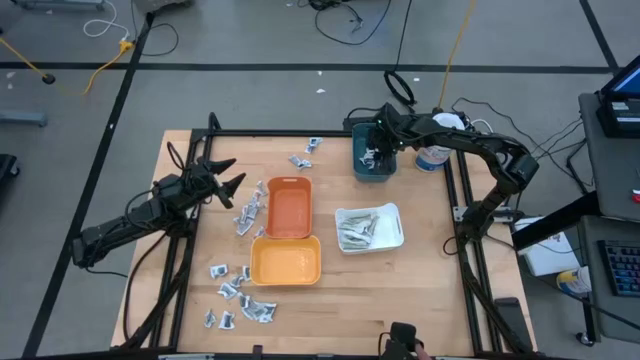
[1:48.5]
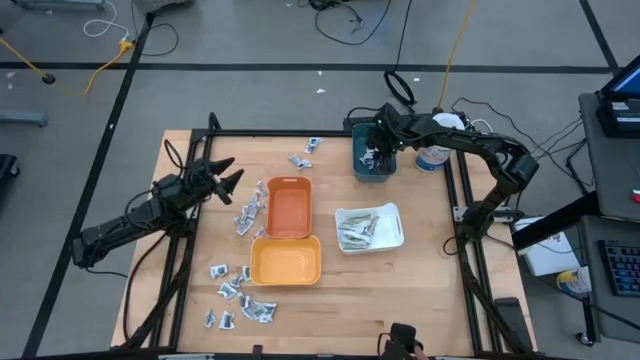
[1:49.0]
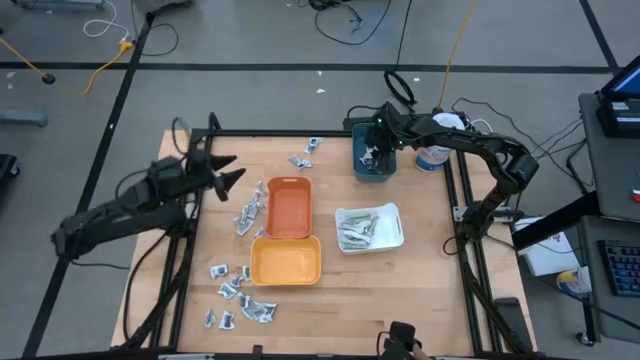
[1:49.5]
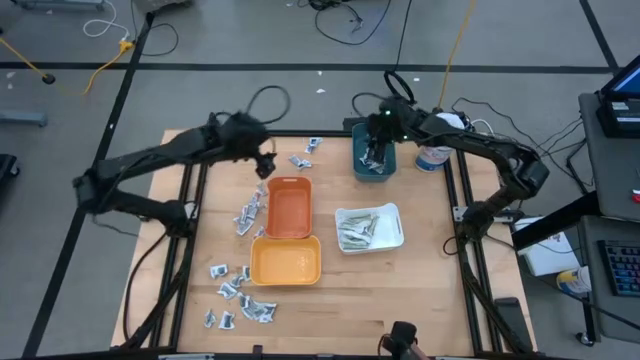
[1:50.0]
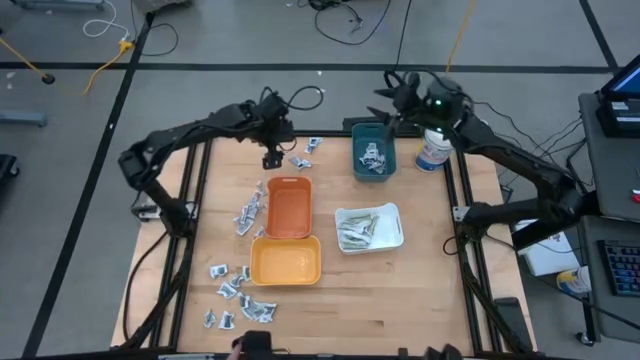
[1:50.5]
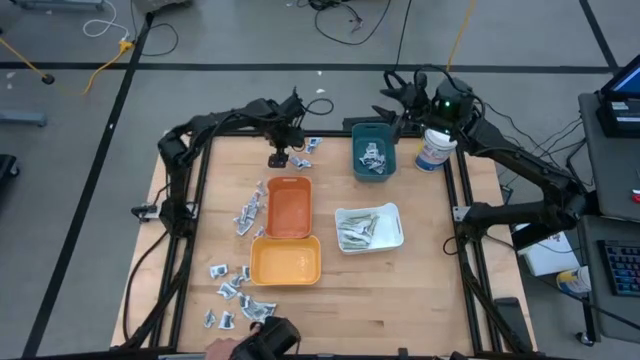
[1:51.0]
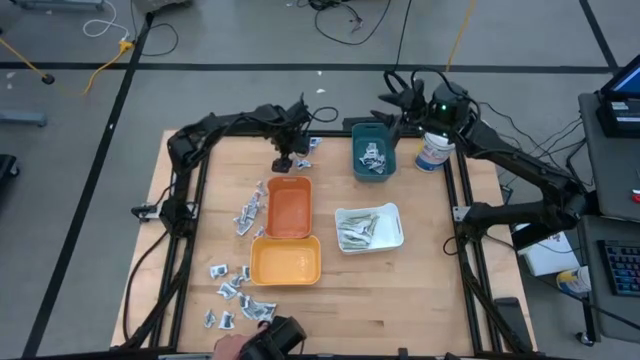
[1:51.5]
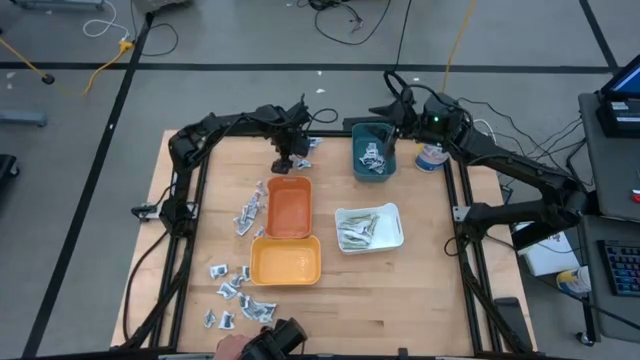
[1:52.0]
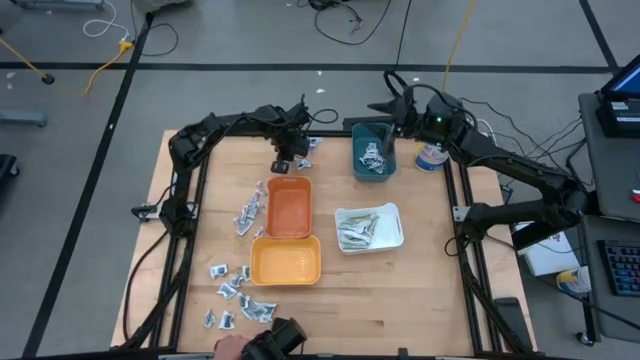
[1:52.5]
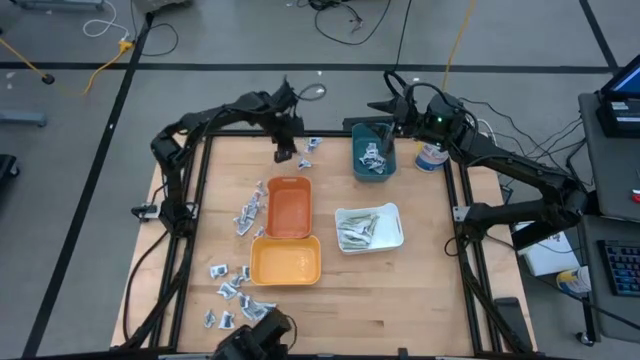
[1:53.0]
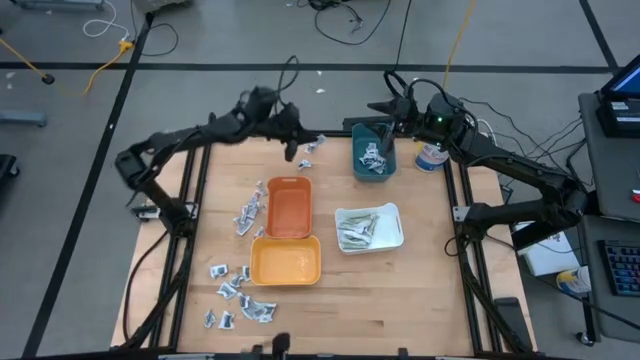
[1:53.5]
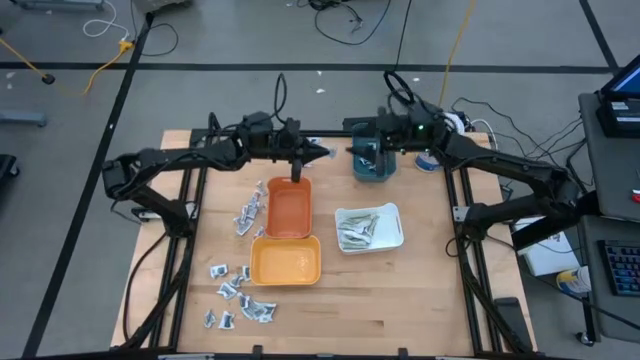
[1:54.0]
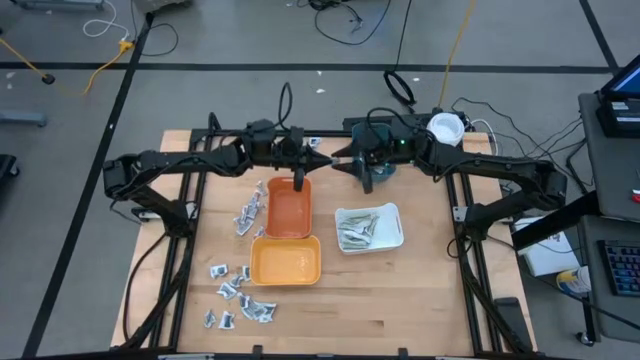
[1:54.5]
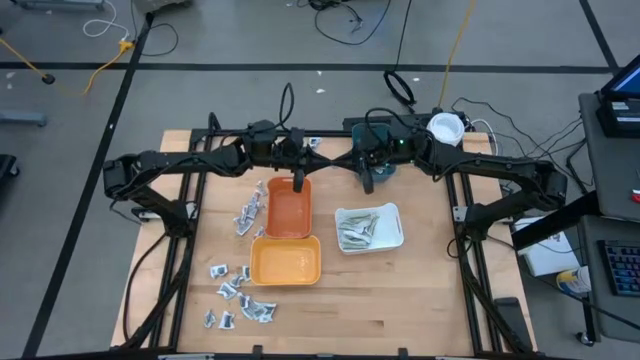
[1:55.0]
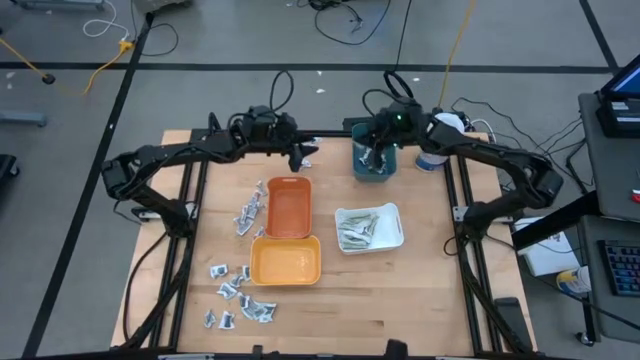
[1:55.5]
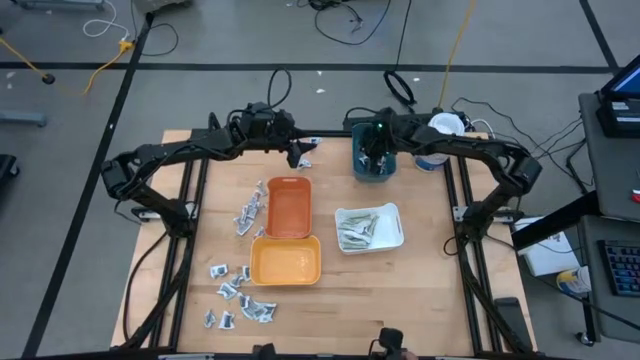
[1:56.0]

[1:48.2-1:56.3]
Task: Pick & Place First Aid Supplies
Put the blue sachet into the blue bin

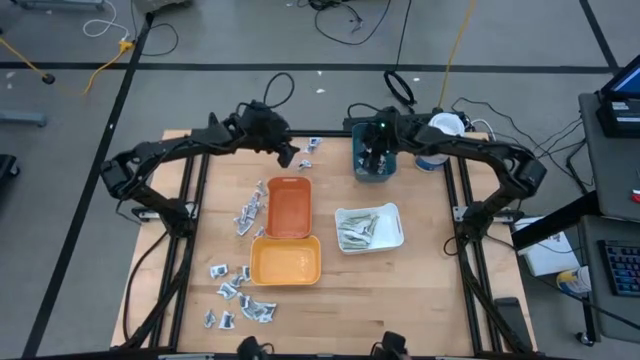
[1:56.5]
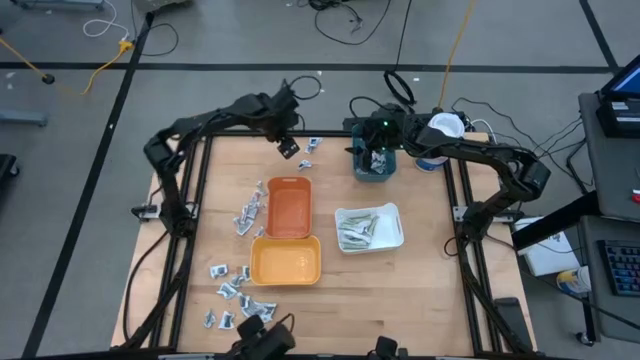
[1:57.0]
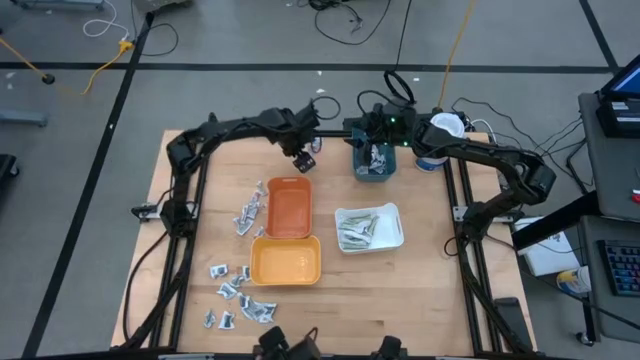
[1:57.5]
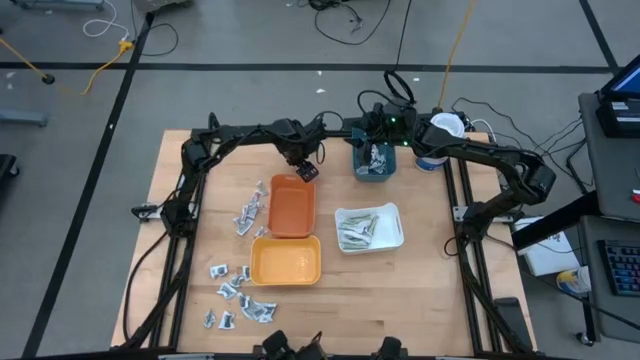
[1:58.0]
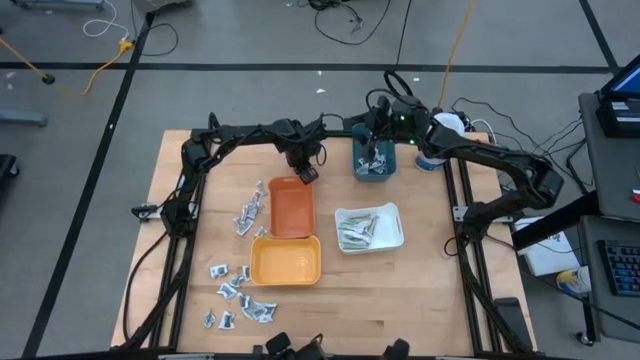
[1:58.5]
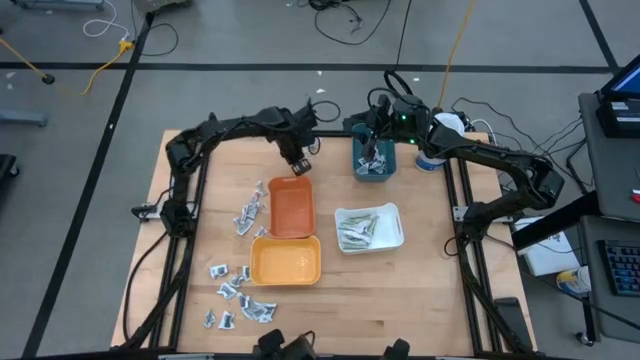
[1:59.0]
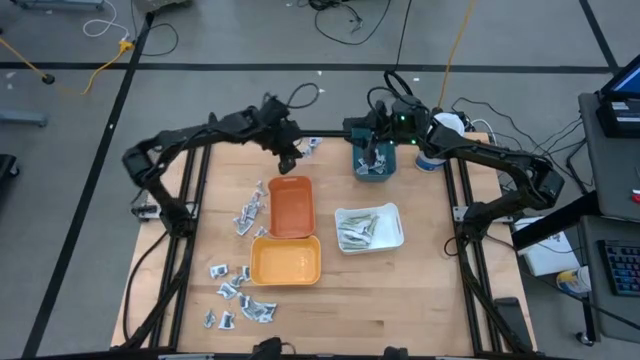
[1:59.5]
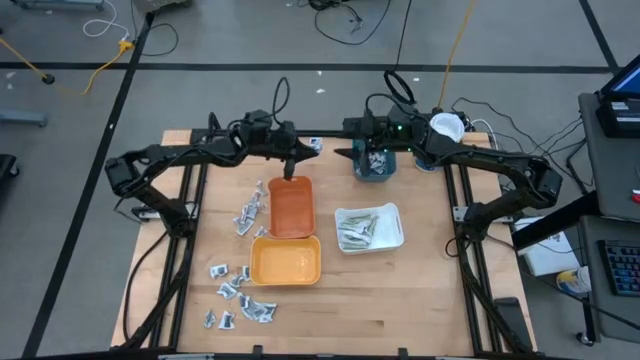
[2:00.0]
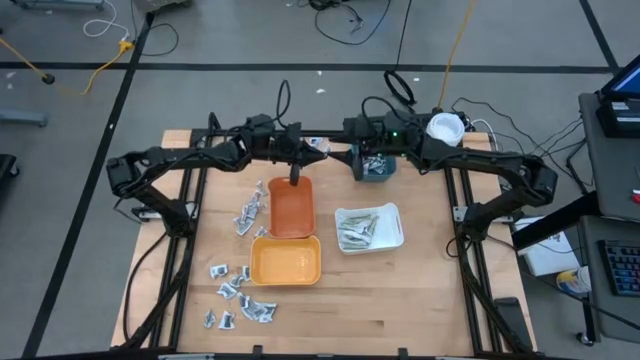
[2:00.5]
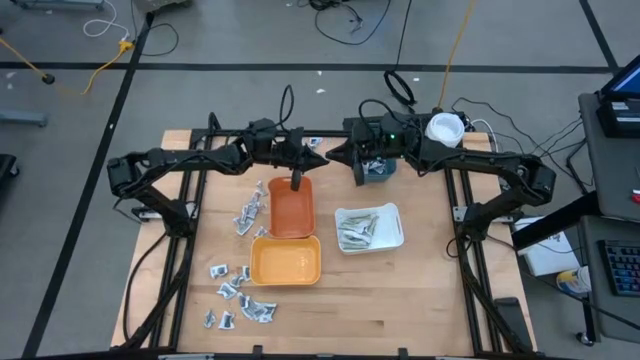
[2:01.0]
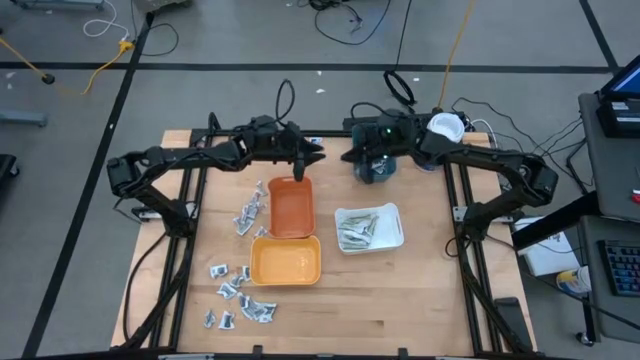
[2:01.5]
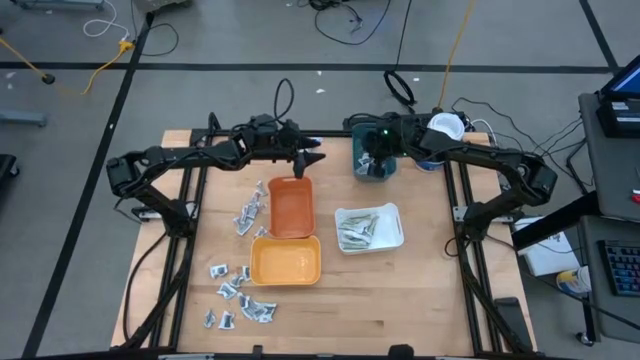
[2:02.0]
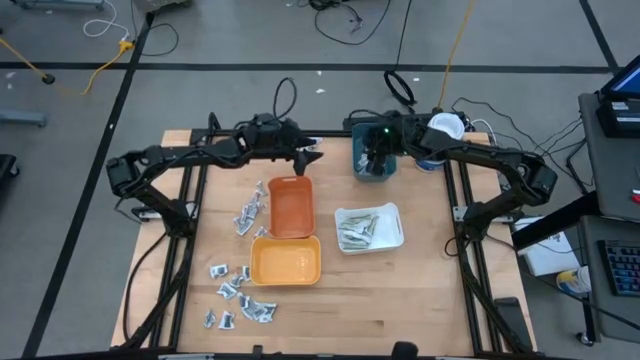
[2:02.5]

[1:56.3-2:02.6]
Put the blue sachet into the blue bin

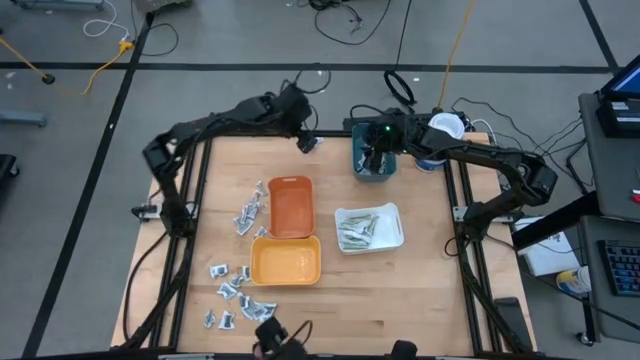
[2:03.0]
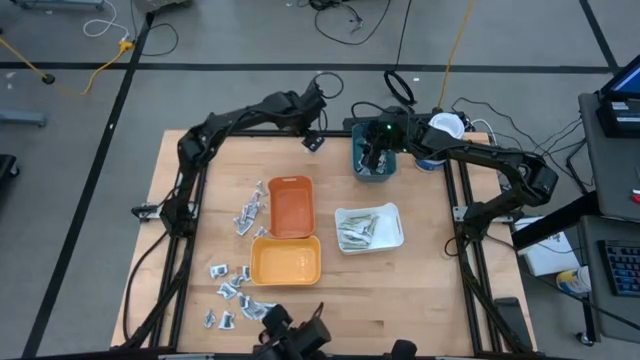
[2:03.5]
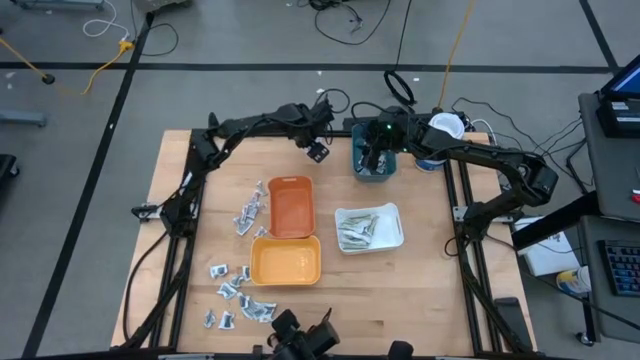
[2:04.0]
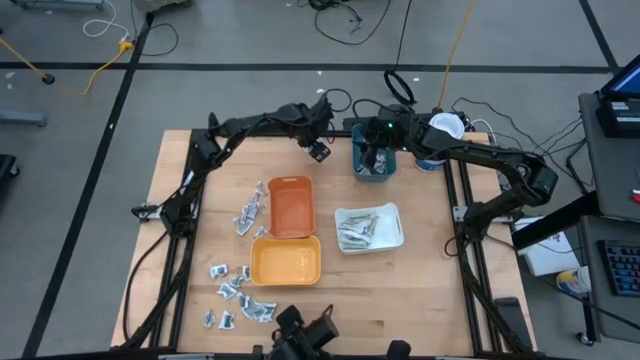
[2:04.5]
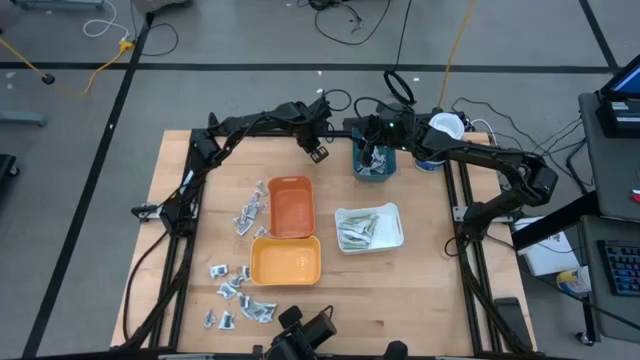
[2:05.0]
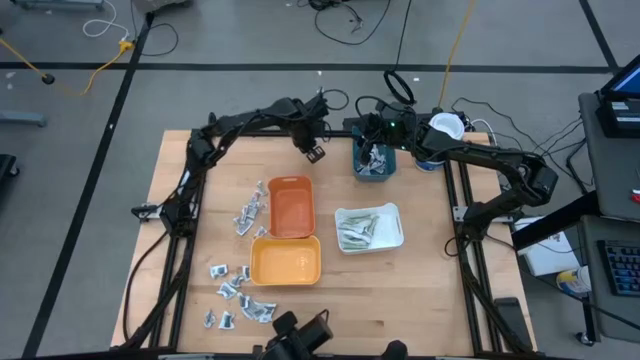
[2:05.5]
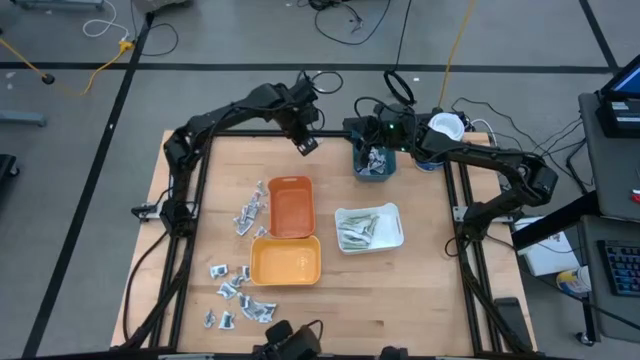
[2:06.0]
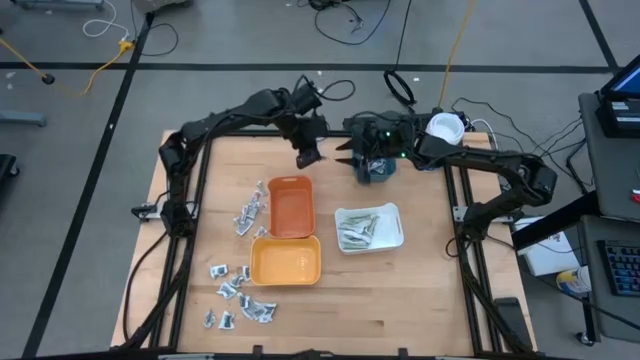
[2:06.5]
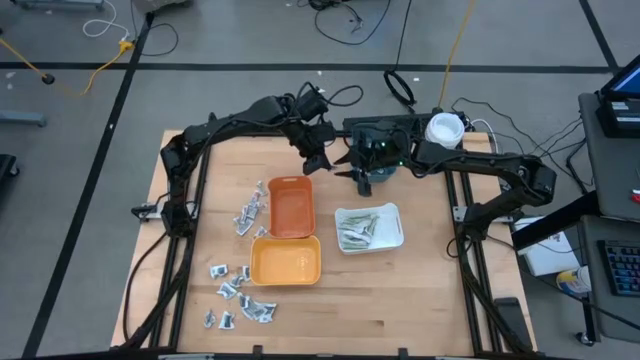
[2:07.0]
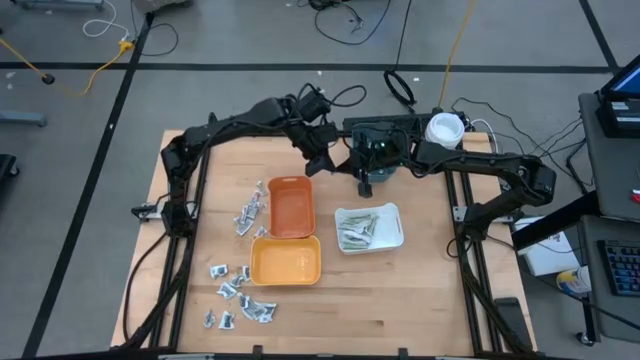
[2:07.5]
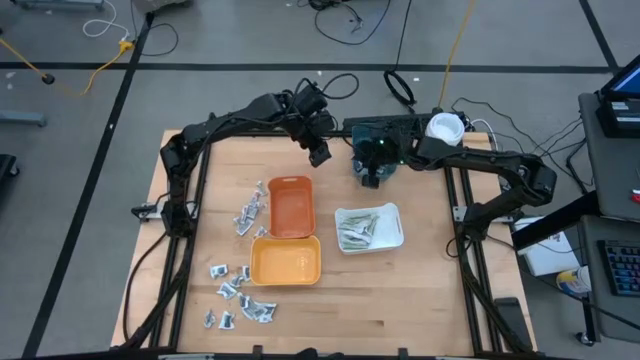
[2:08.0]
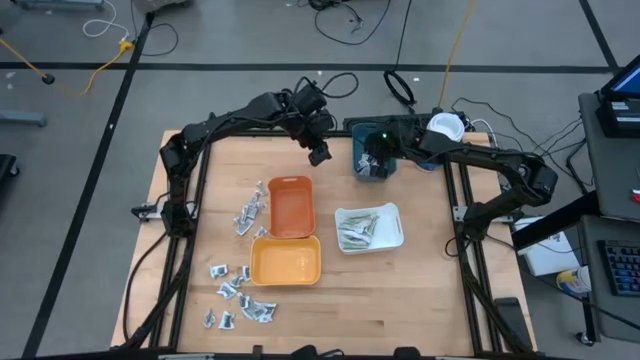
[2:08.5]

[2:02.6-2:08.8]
Put the blue sachet into the blue bin

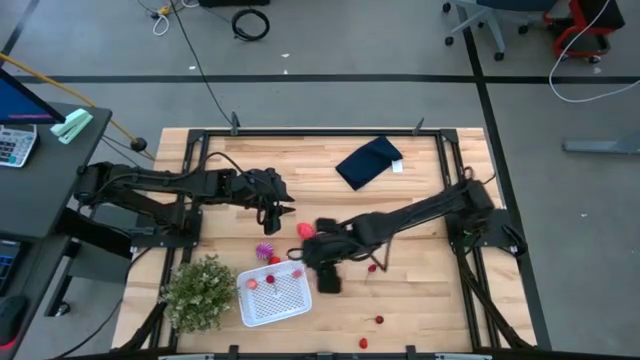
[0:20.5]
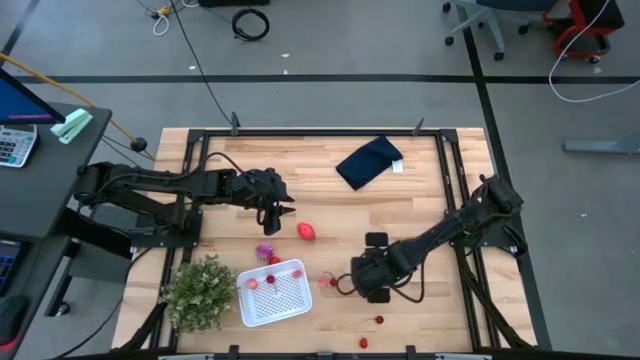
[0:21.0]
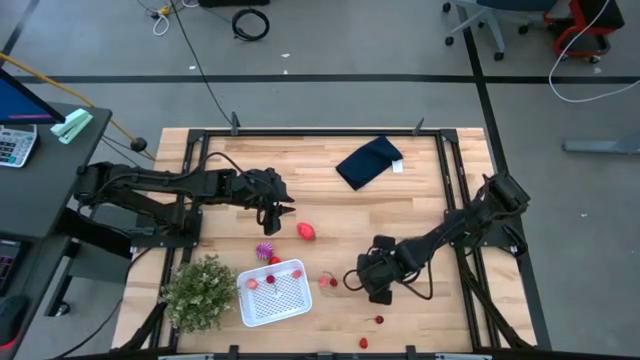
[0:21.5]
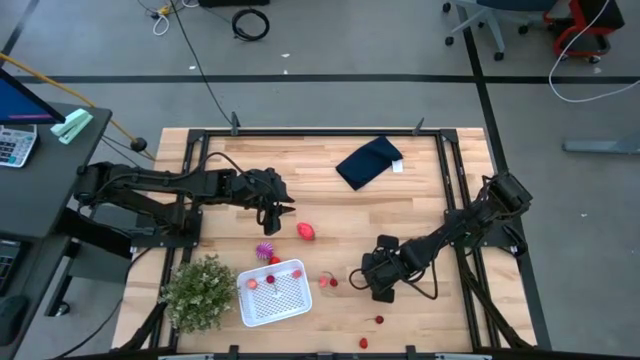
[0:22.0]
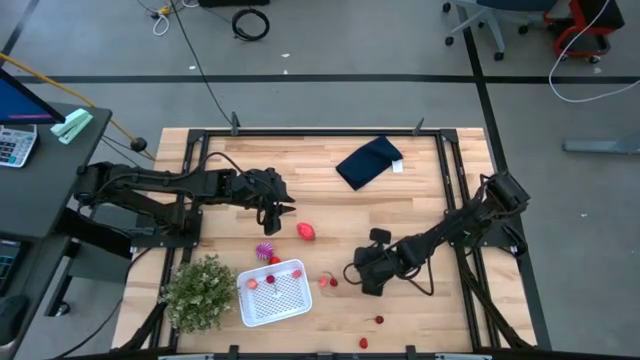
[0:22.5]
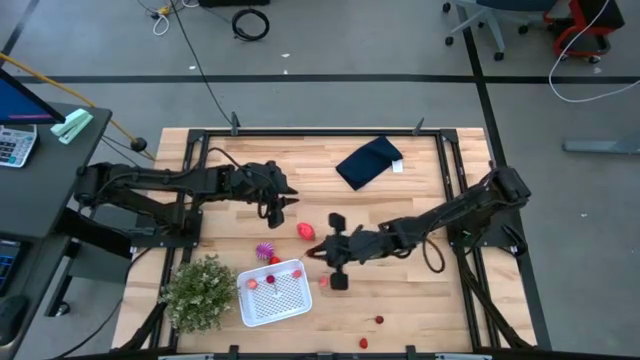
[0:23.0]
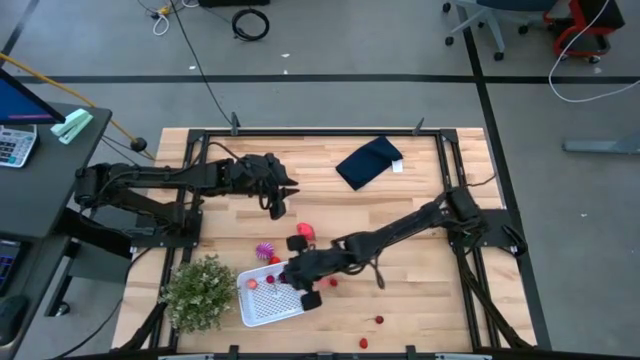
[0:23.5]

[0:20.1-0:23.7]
Task: Pick and placing Produce into tupperware
Put the cherry into the white bin
